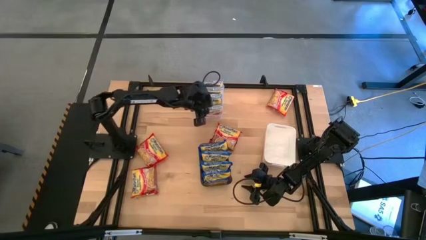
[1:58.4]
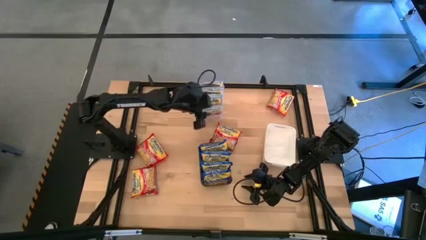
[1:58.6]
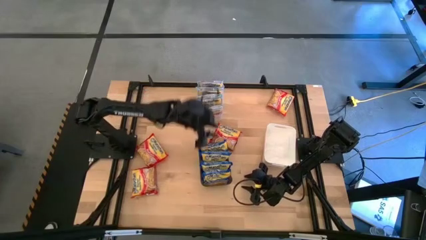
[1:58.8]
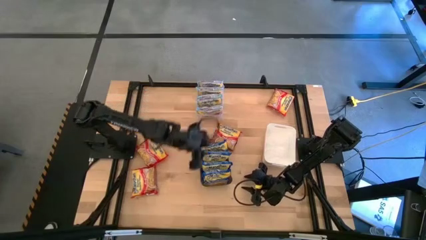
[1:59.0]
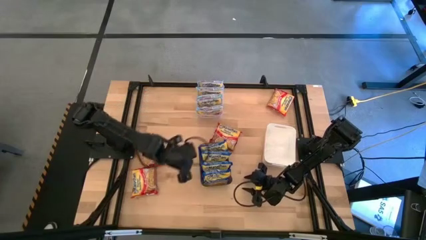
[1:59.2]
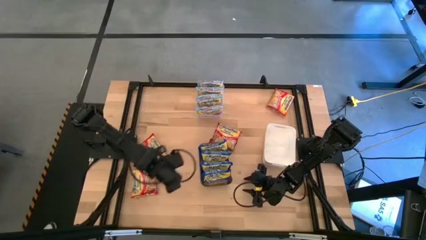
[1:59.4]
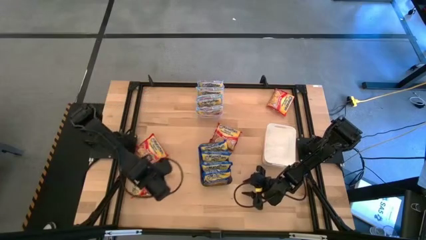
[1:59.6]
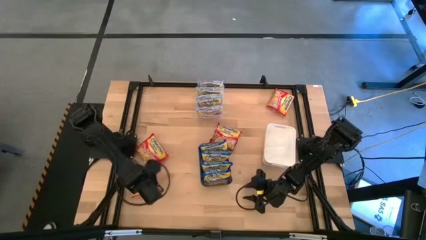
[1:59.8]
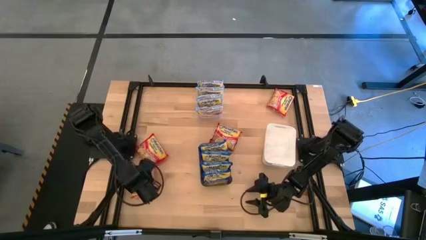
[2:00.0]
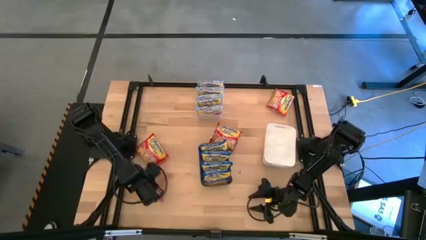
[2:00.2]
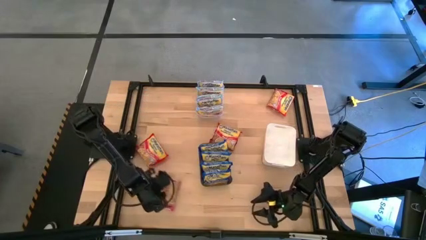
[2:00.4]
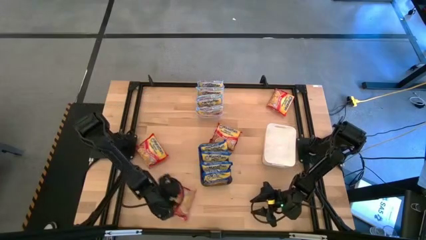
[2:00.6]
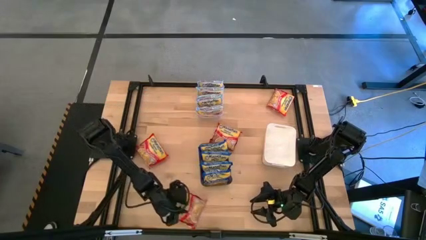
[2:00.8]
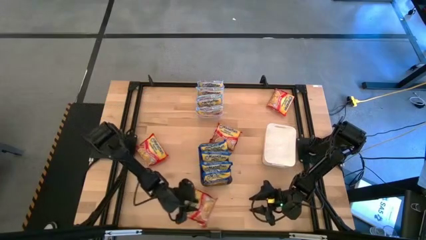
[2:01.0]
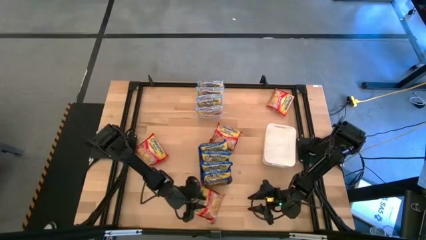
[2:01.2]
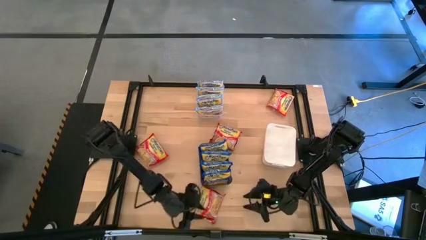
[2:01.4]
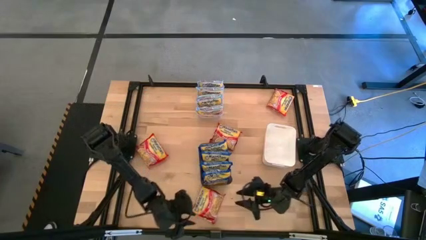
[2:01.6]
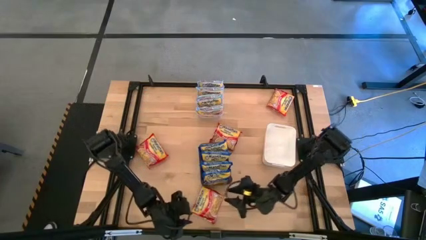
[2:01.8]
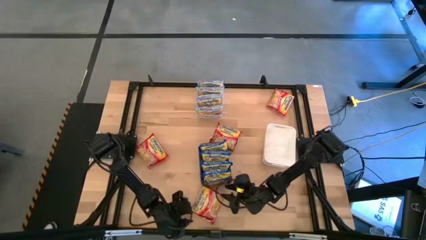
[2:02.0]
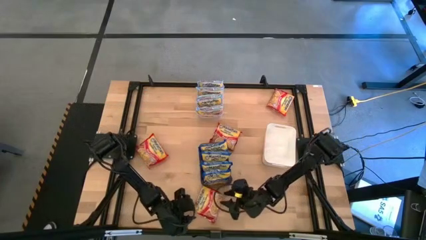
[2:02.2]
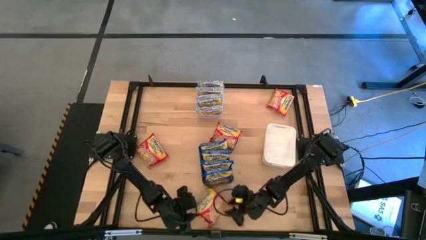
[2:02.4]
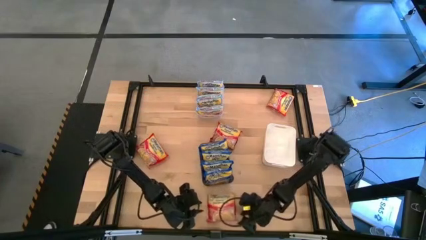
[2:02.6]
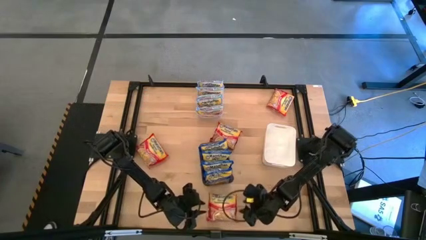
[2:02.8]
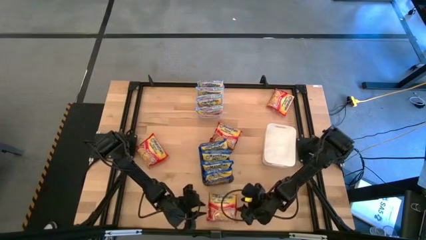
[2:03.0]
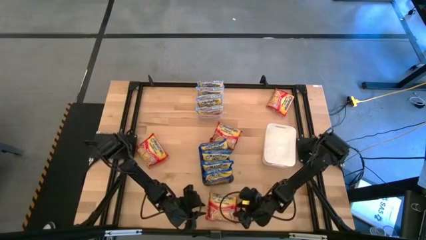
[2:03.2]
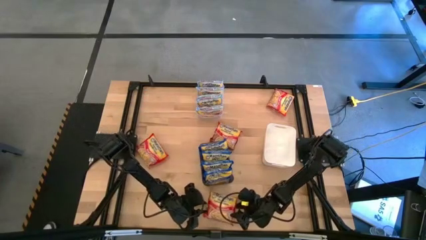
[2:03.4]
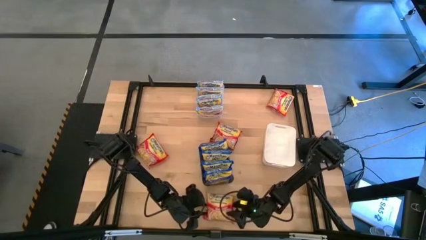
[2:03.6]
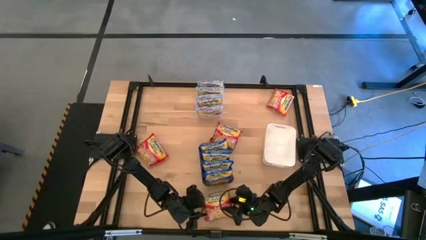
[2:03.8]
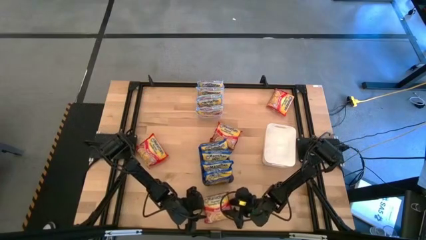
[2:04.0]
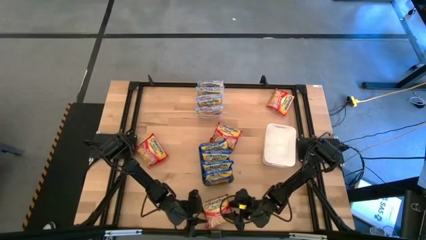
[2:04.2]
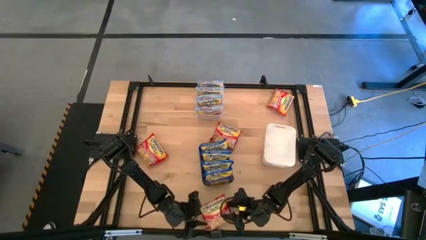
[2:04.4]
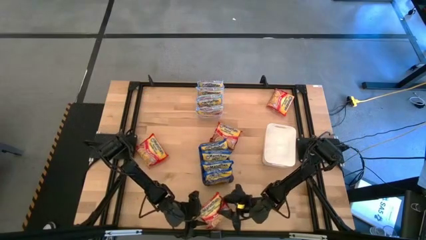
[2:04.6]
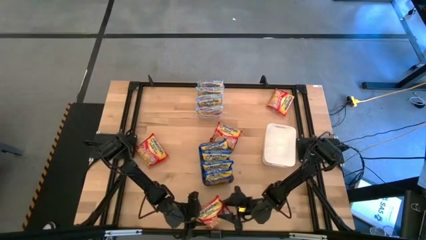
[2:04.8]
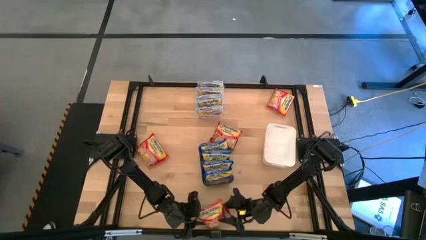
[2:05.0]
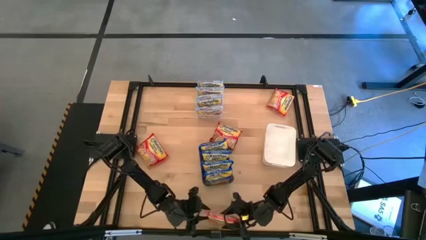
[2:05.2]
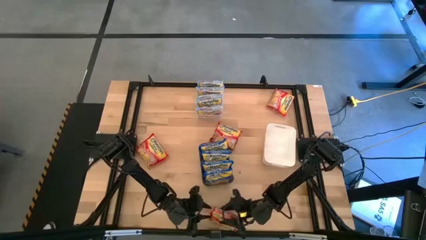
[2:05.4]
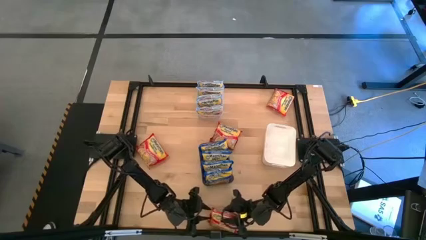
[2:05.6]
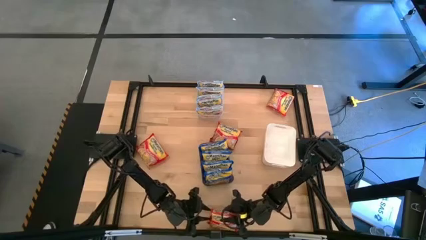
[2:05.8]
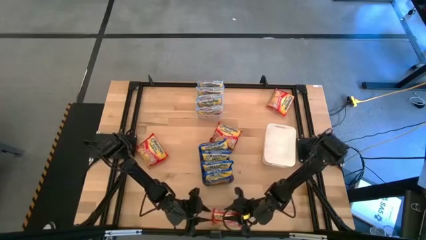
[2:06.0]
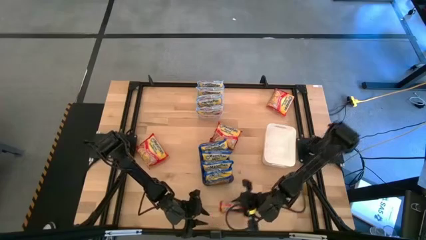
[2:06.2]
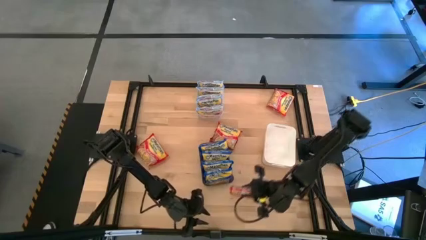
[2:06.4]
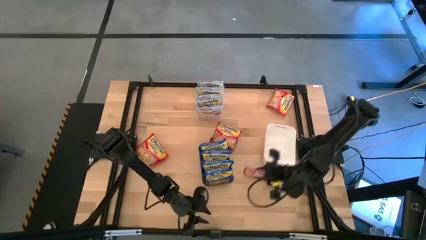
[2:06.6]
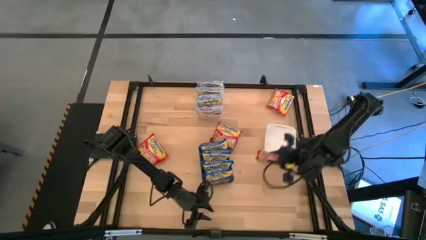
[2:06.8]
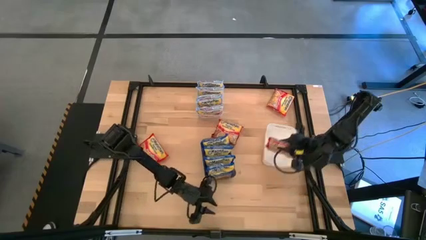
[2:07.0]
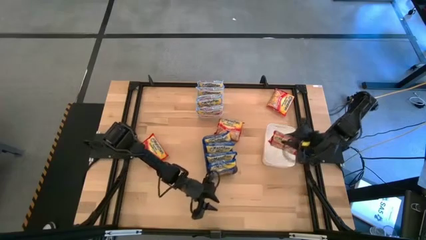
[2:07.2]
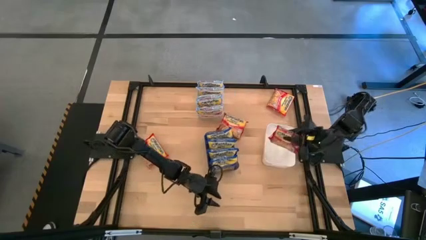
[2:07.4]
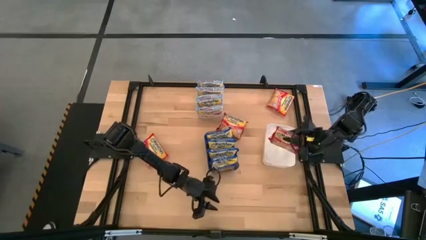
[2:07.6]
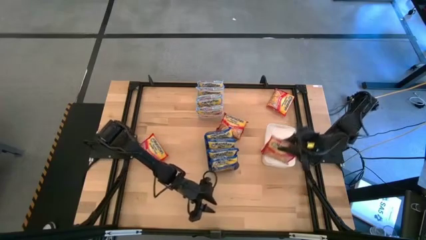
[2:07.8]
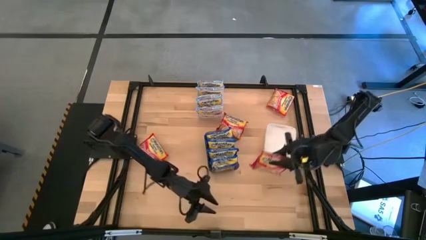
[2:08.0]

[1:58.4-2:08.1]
Task: Sort Maruchan noodles
Put the bottom left red noodle pack into the white bin

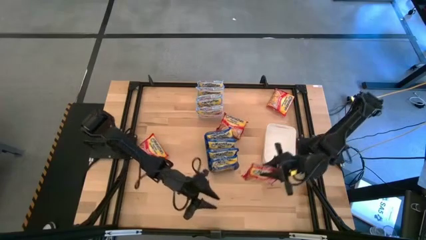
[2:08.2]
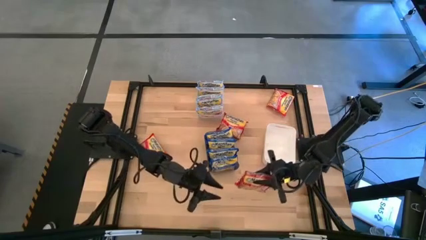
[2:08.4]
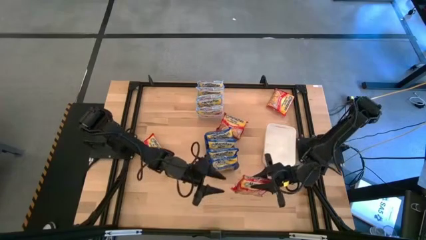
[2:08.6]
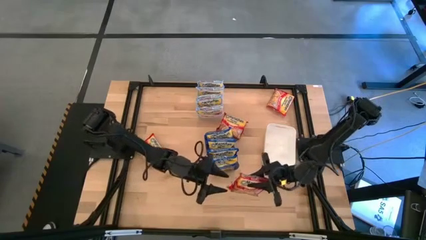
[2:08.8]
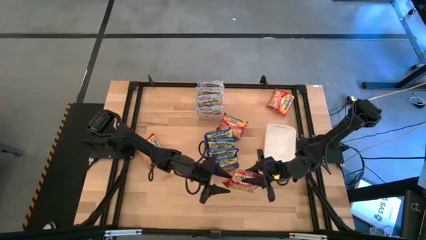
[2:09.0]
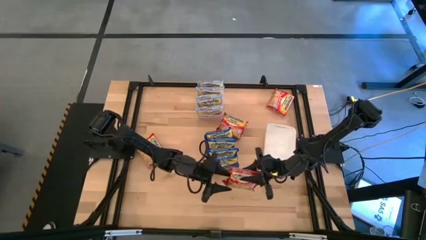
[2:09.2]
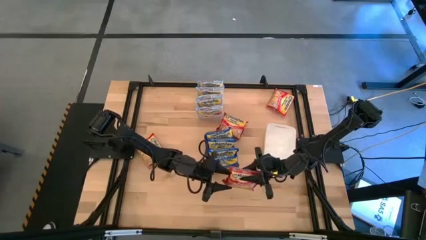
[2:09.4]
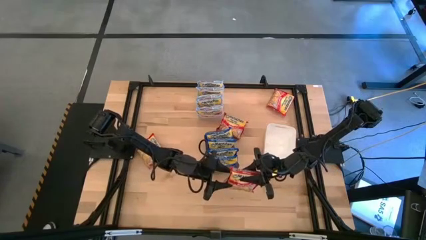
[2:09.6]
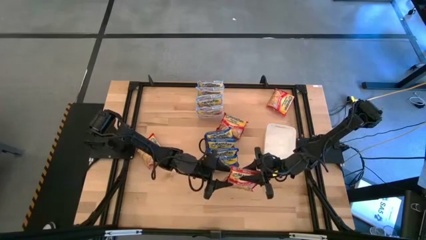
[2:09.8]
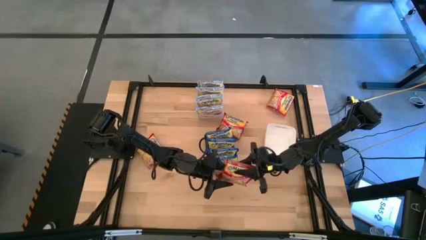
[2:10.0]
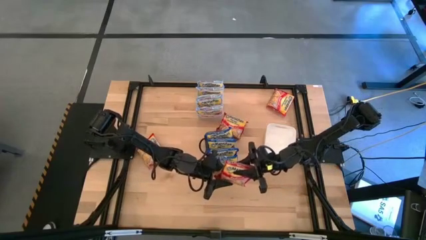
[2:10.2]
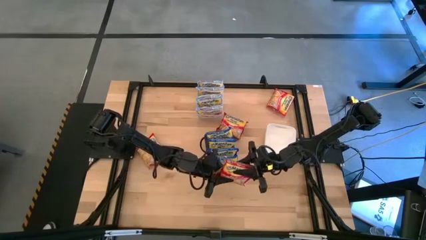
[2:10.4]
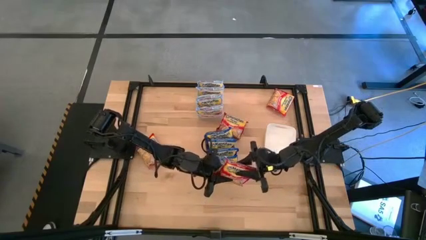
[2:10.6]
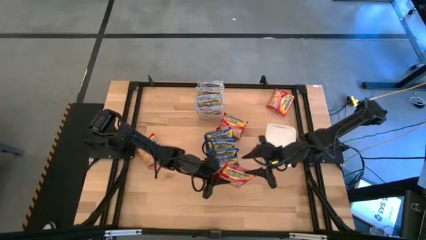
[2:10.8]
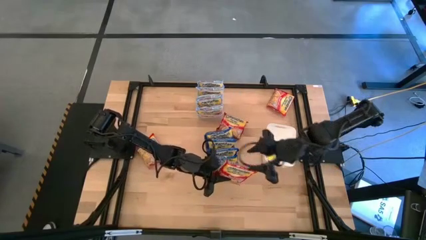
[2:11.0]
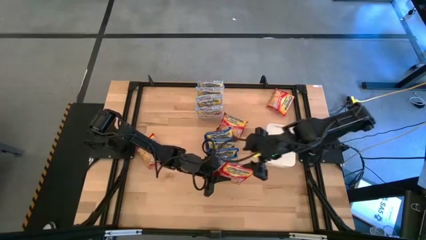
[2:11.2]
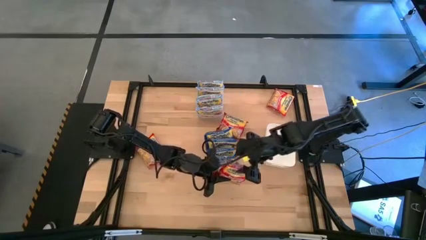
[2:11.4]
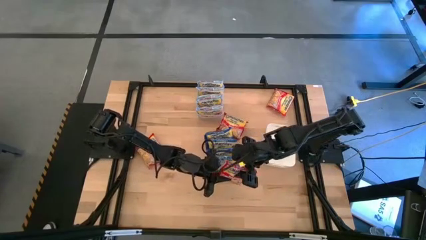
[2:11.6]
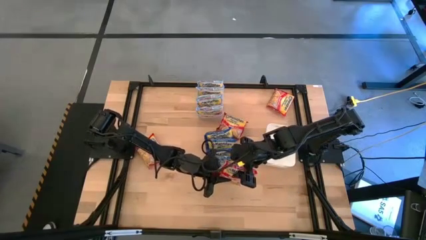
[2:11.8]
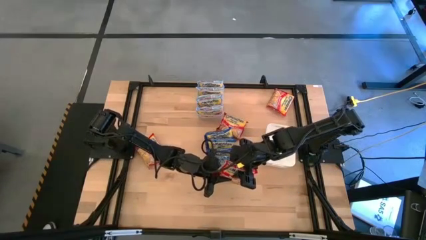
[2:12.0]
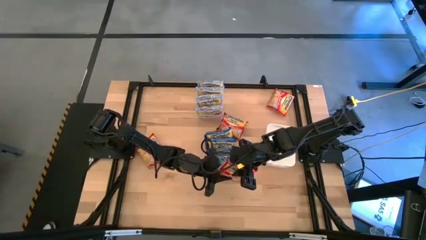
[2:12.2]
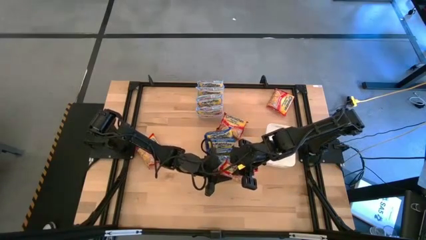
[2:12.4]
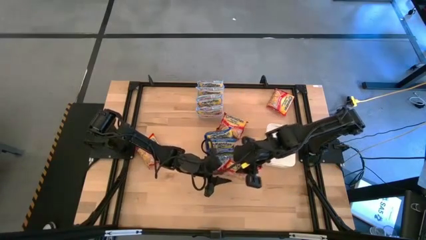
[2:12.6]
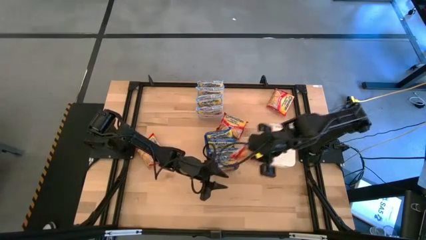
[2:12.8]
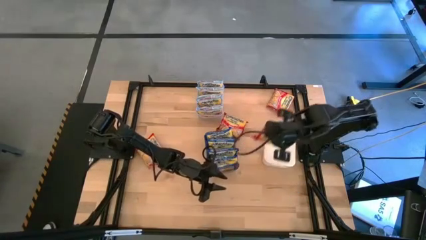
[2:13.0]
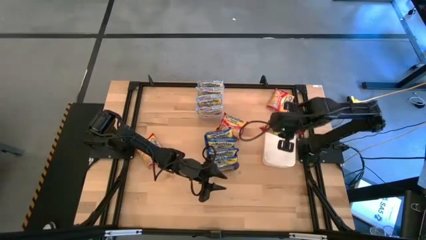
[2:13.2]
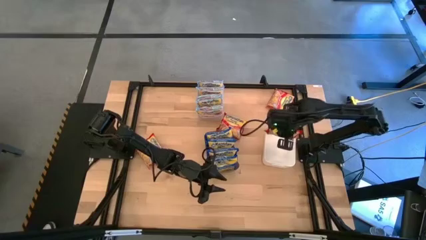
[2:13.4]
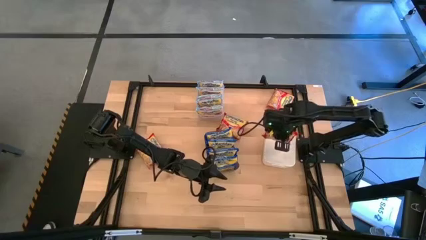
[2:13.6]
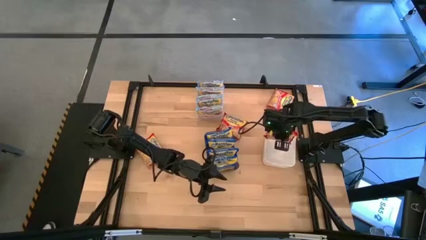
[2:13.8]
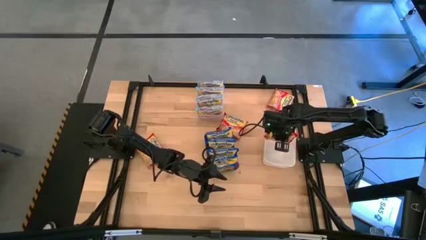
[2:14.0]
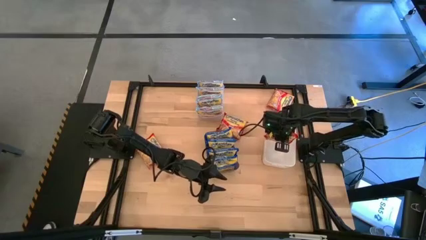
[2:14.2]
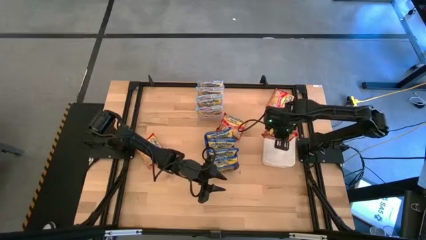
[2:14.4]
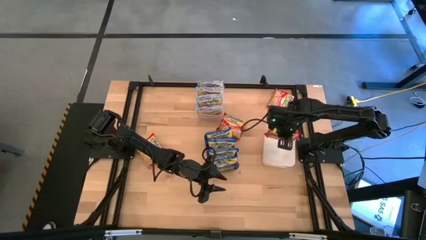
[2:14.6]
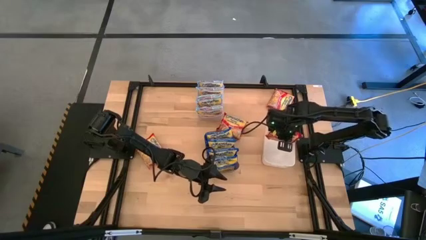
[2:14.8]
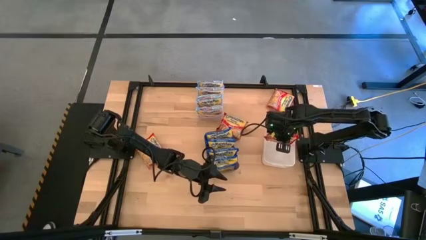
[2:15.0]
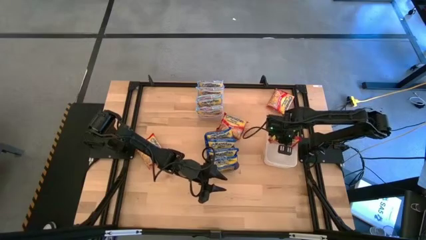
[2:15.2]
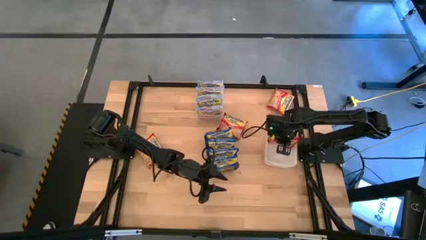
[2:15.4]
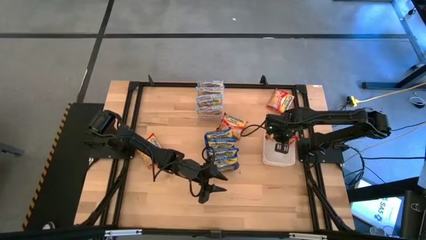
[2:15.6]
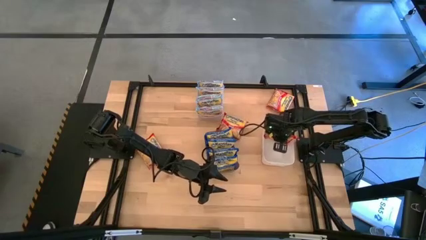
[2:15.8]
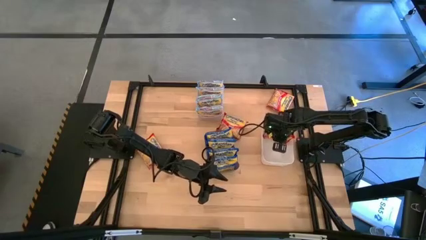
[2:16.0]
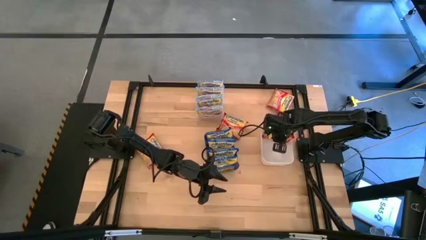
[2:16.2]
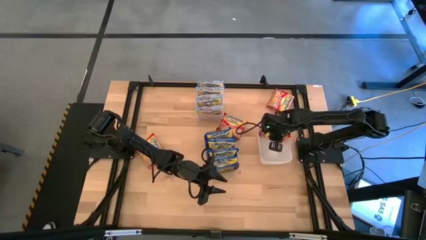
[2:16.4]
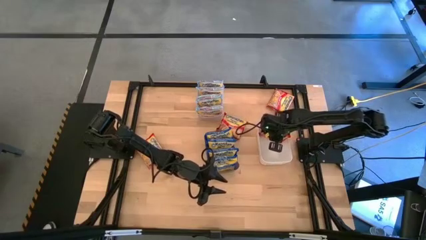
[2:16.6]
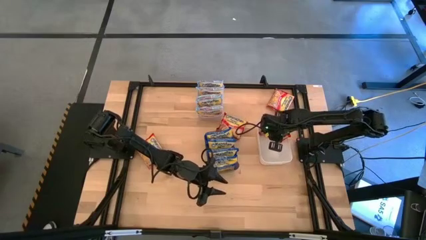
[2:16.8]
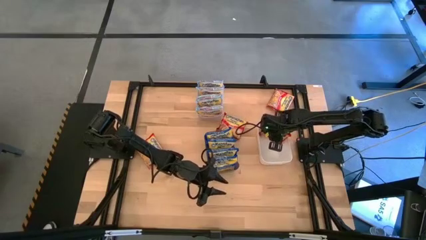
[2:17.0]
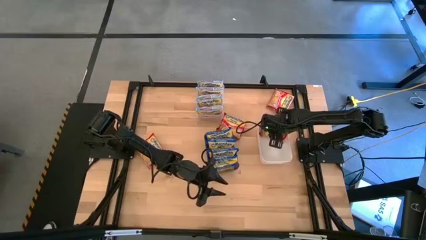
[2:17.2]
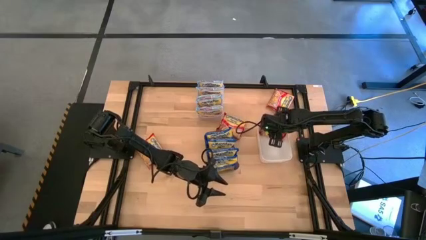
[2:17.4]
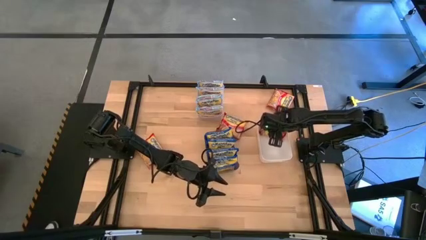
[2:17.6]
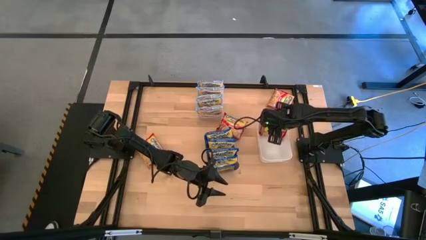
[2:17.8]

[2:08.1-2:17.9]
Put the bottom left red noodle pack into the white bin
